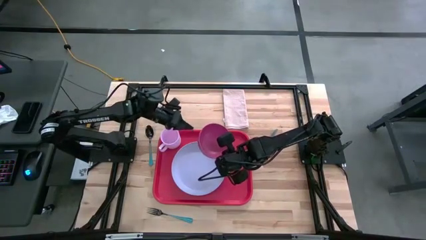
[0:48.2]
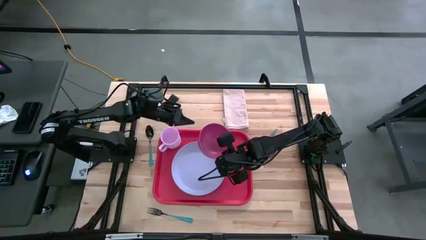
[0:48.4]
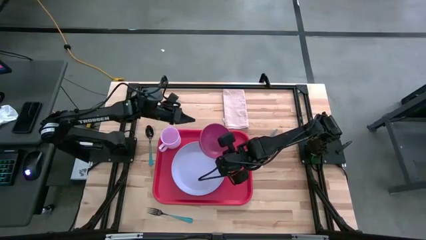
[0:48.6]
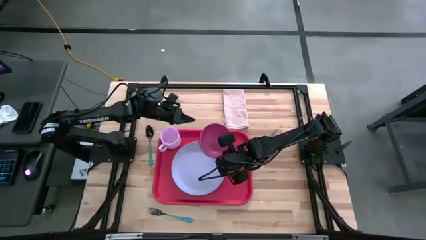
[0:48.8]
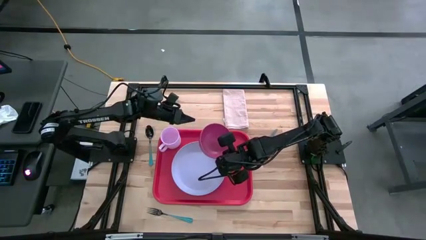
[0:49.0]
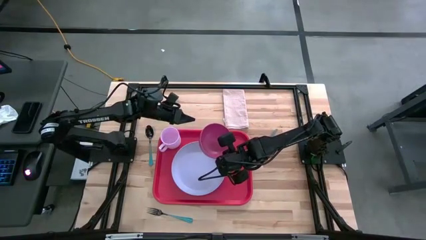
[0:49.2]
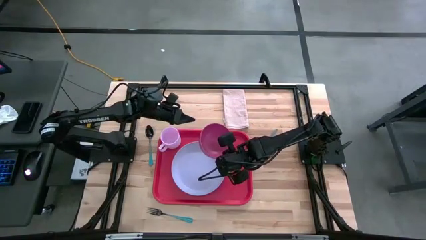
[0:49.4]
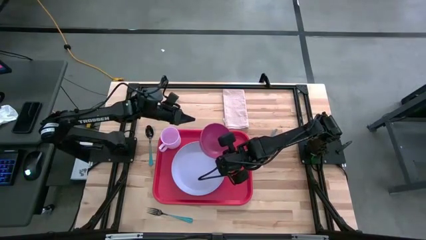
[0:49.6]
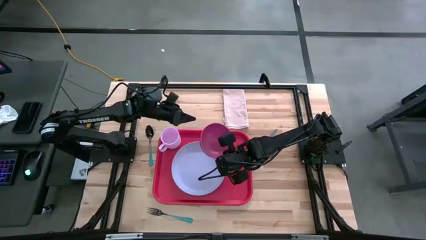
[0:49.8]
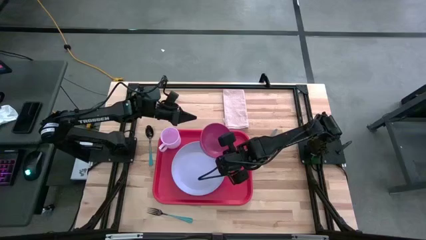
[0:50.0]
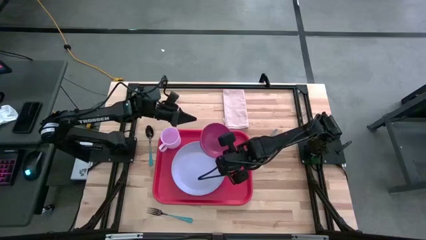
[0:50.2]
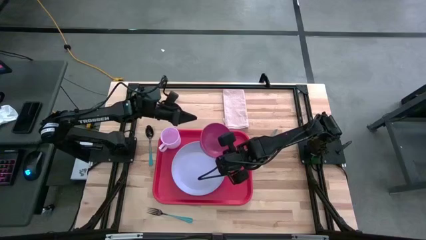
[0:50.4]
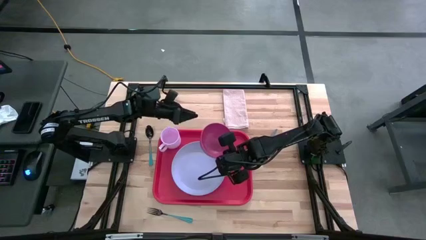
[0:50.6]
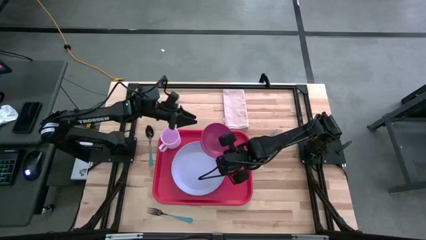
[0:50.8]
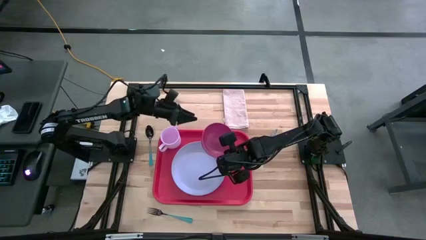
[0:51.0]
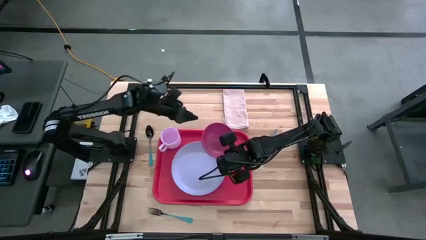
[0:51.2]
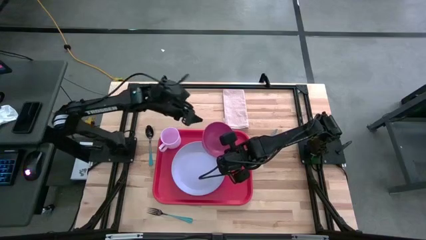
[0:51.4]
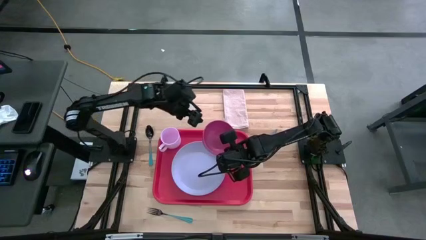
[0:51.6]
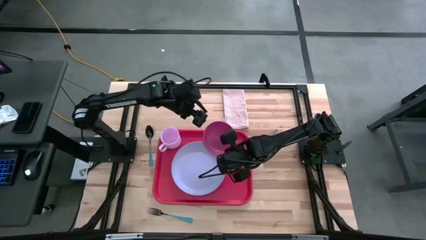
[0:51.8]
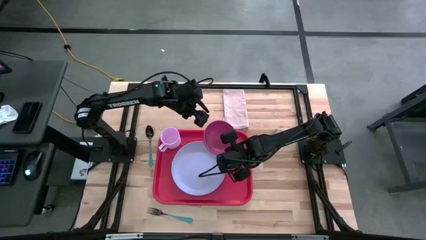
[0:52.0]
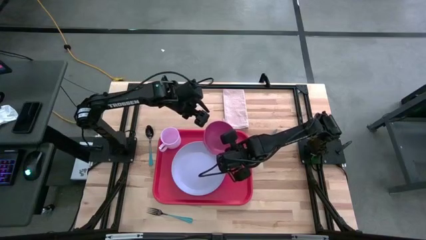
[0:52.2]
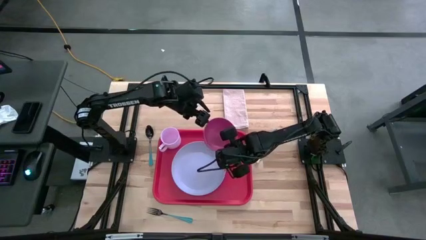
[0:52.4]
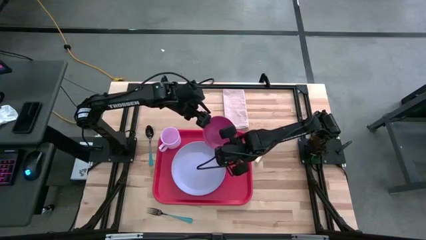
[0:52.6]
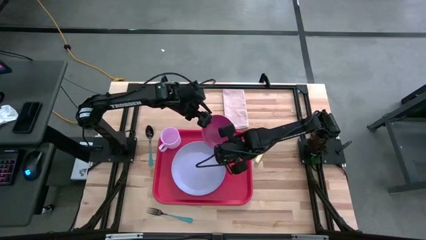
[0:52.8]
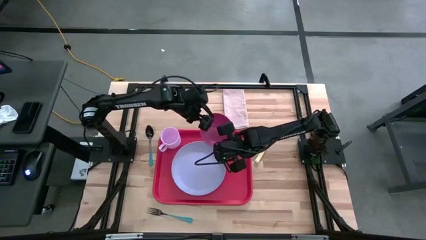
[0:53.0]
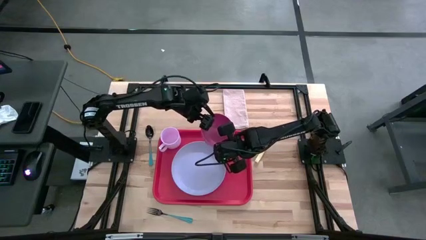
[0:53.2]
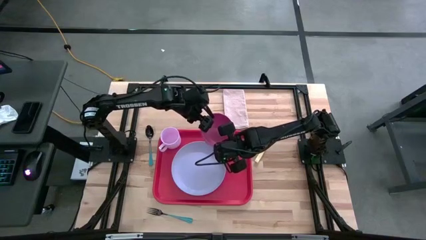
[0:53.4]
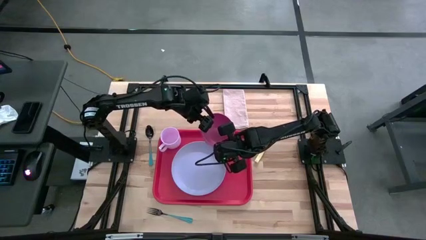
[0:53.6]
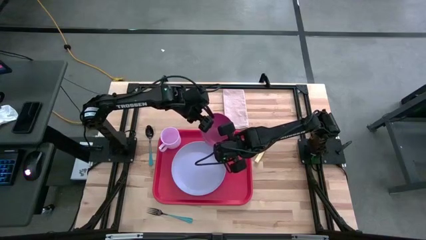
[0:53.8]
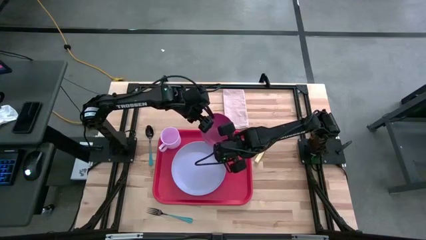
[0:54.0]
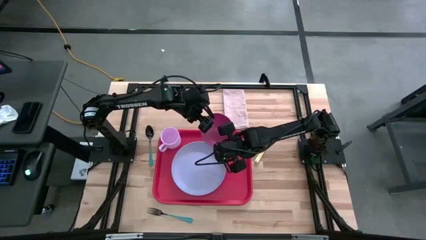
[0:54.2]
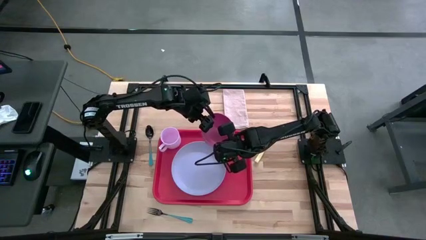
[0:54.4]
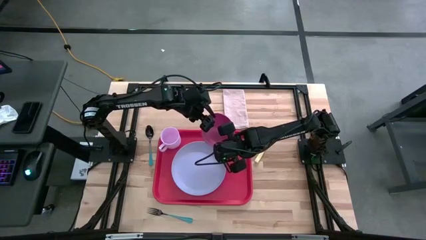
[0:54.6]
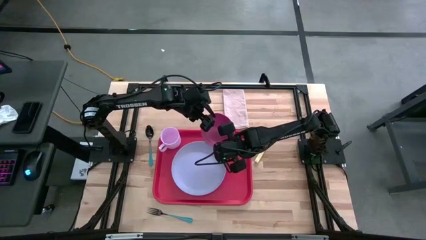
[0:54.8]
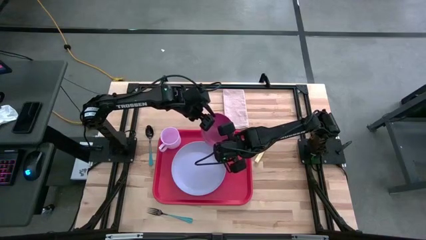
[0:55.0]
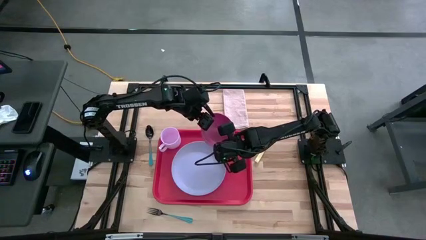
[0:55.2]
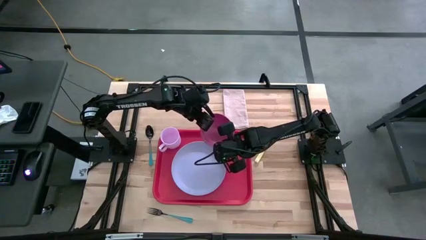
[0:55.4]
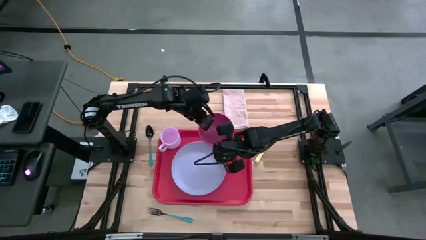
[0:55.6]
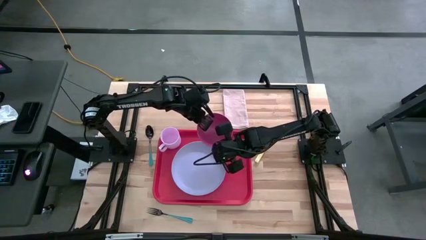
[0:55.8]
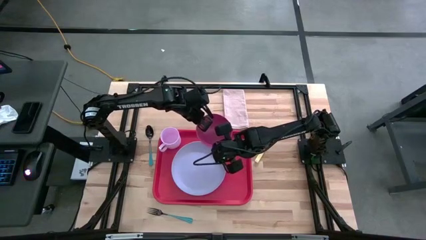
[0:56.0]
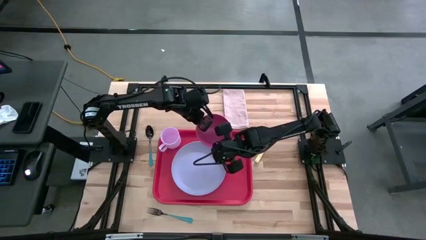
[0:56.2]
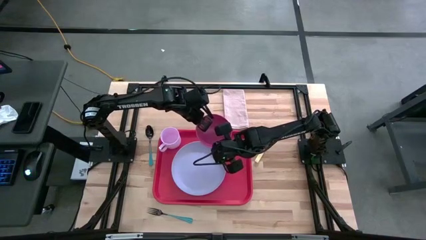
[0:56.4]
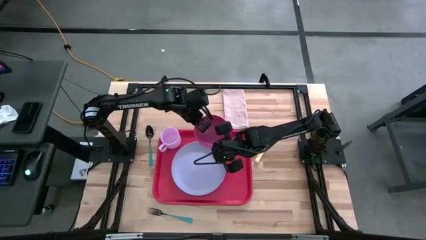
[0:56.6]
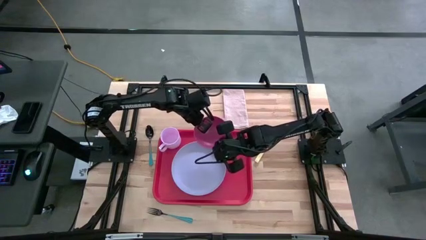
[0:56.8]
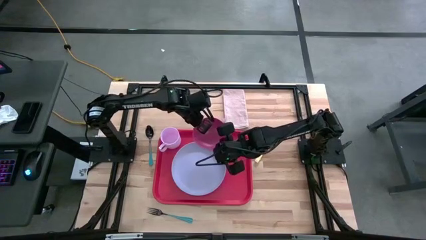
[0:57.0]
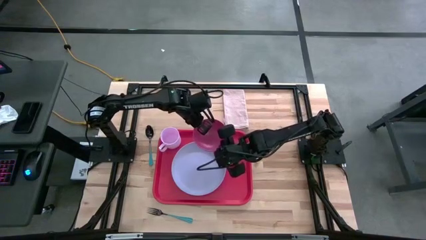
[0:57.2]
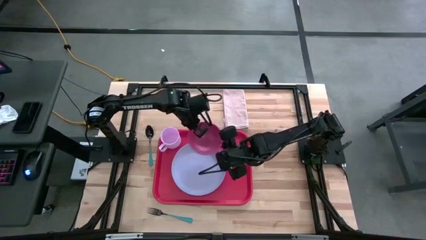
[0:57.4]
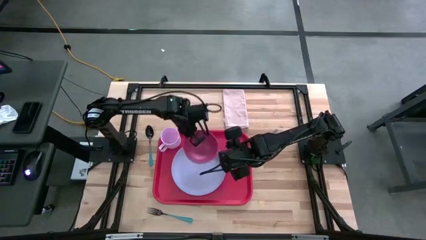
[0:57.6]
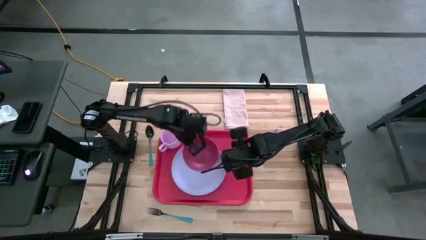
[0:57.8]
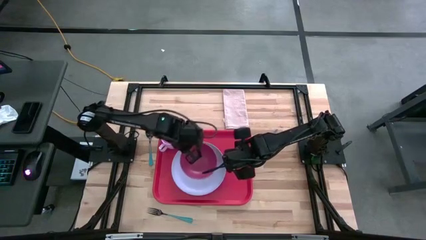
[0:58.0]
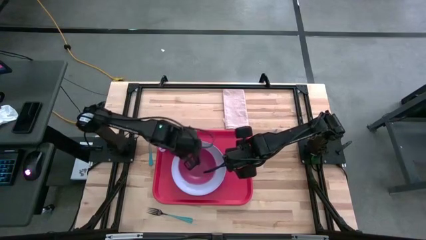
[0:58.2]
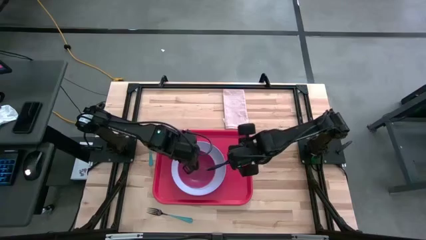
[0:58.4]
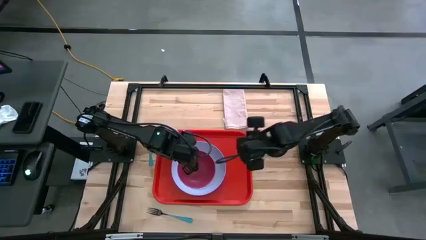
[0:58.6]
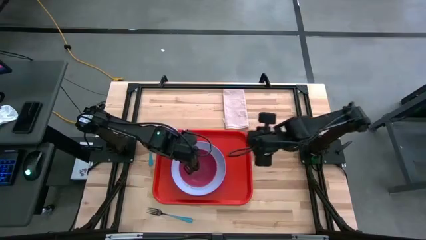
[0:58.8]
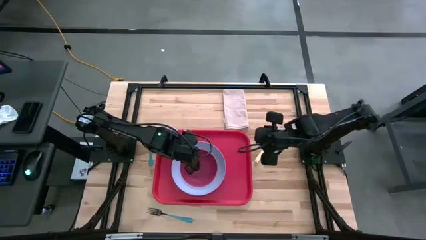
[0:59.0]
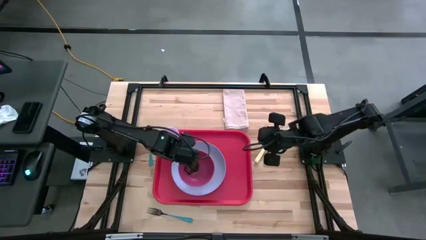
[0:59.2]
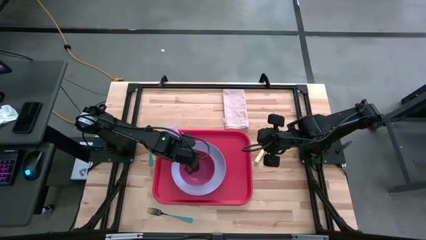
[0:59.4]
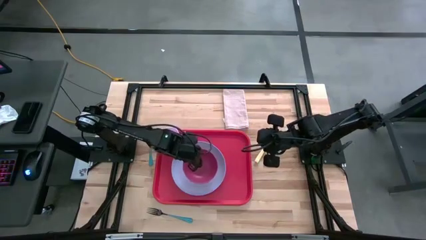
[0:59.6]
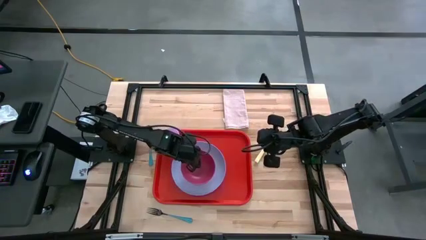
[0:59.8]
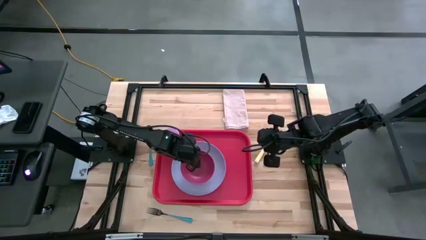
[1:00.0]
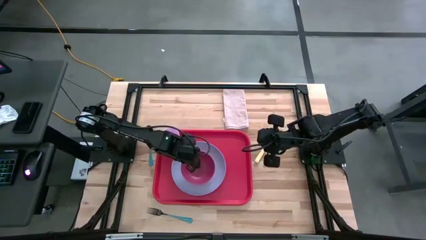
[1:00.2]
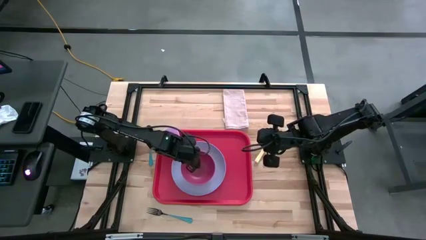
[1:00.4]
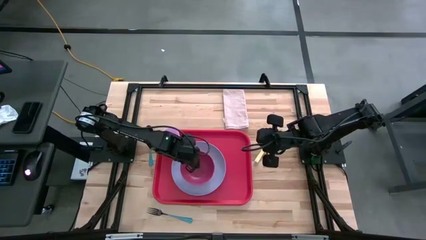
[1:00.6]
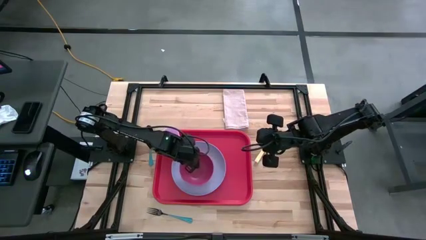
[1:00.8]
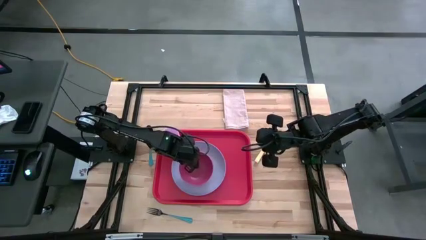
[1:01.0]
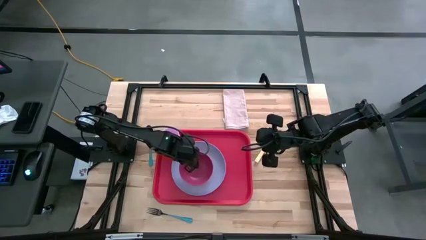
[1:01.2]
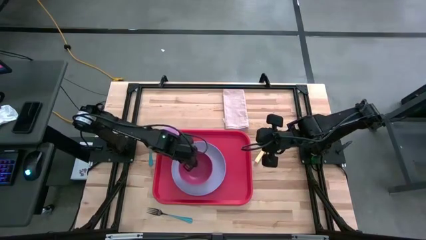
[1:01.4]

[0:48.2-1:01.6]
Task: Set up tray
Put the red bowl on top of the blue plate

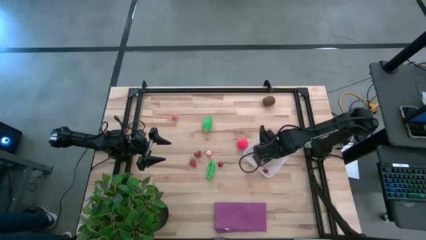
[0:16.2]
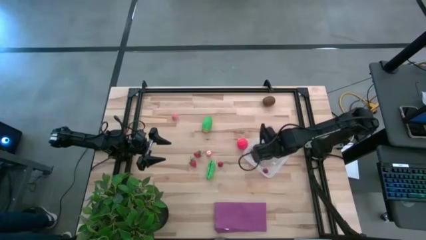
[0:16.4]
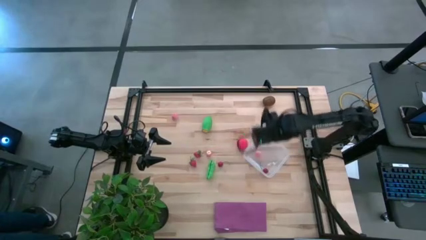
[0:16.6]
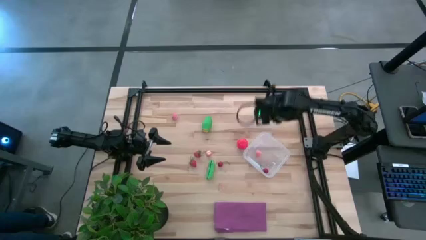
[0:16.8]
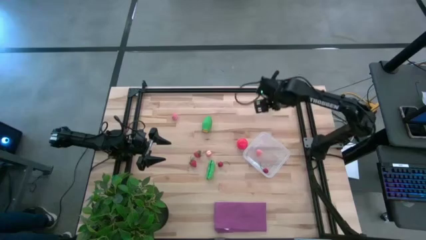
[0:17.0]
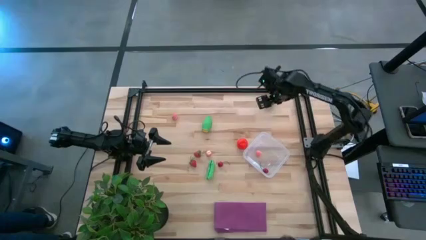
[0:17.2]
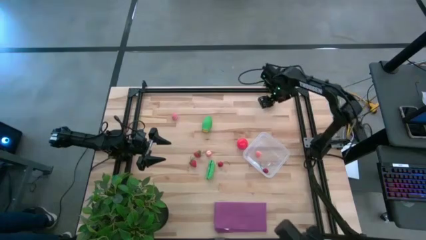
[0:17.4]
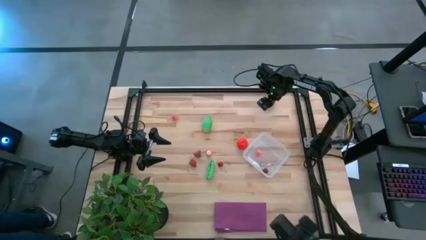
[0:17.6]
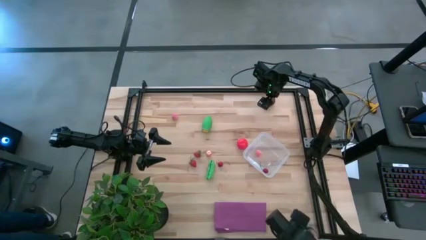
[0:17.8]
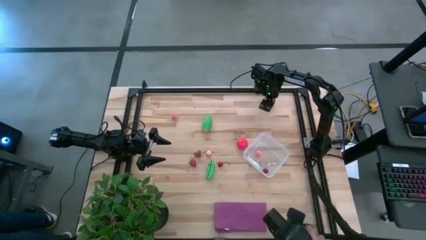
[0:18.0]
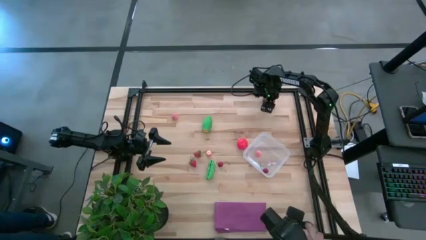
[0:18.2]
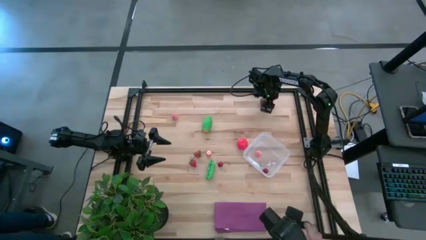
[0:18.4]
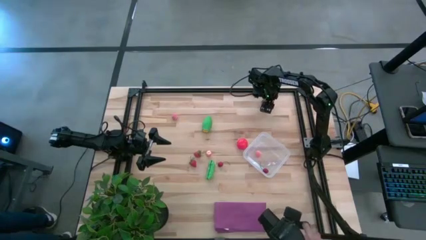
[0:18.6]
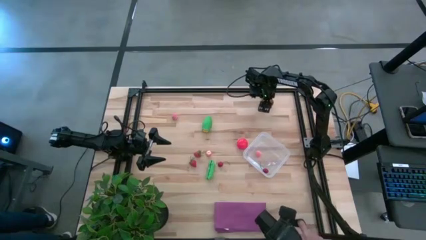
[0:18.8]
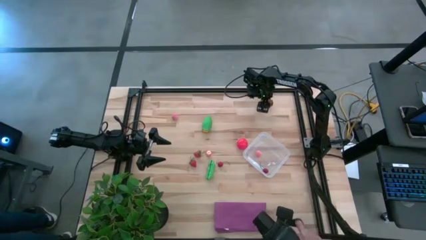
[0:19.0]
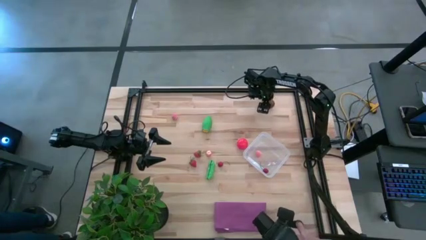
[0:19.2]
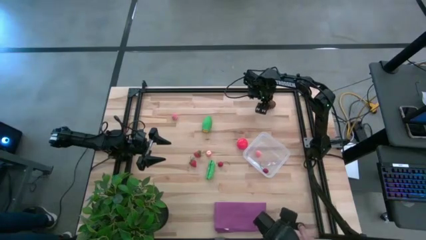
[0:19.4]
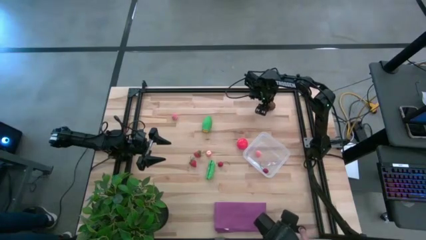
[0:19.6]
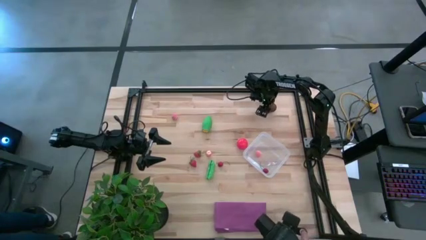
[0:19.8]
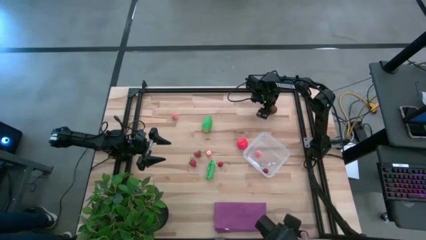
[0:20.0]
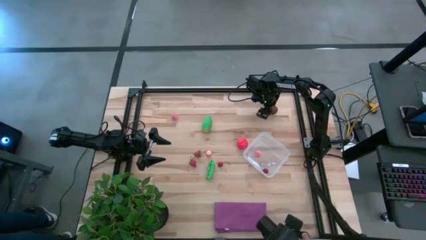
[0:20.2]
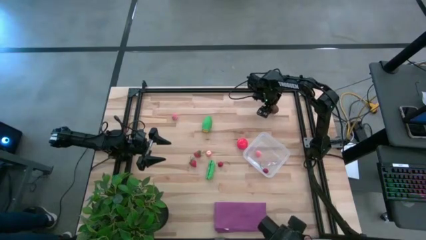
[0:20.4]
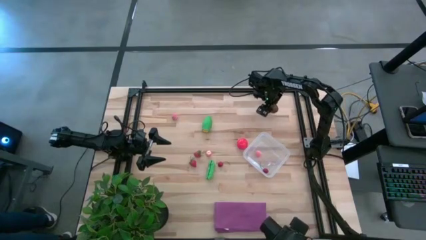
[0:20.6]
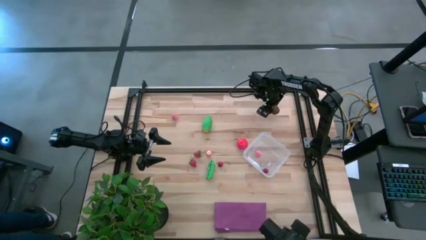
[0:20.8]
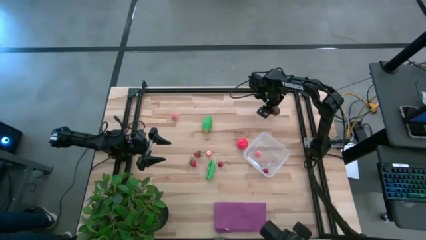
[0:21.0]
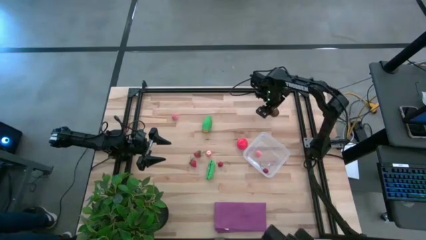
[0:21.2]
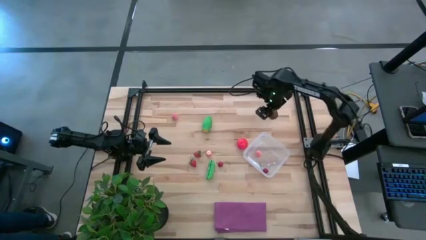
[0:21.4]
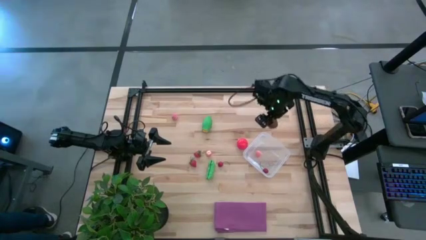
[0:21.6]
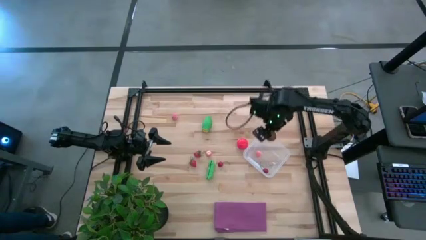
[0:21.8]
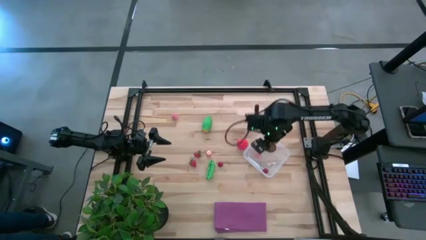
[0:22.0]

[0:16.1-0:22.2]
Task: Pick and placing Produce into tupperware
Put the brown kiwi into the transparent bin
